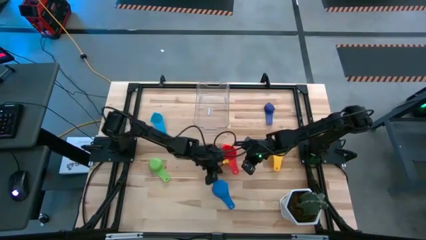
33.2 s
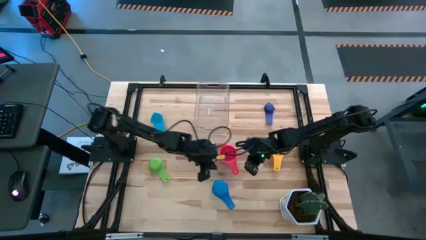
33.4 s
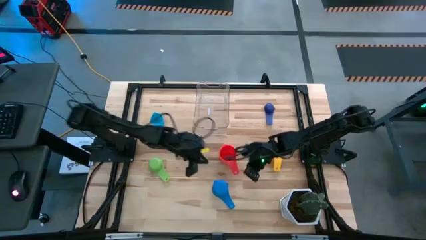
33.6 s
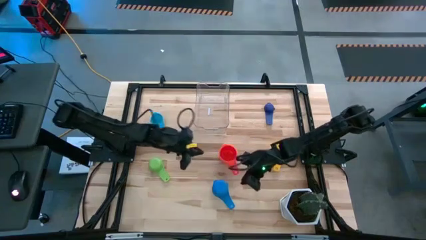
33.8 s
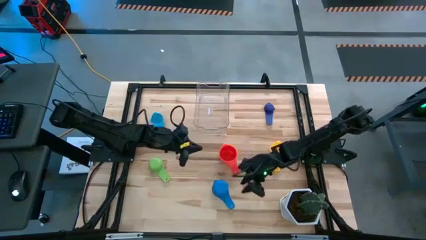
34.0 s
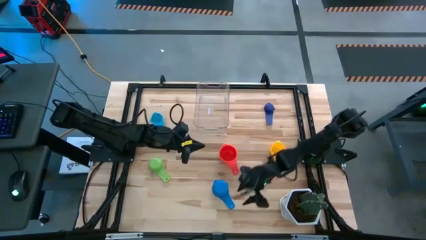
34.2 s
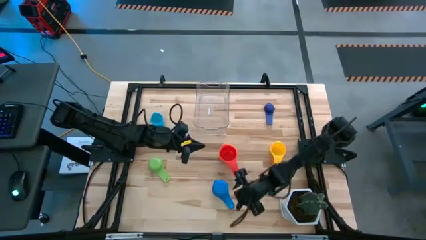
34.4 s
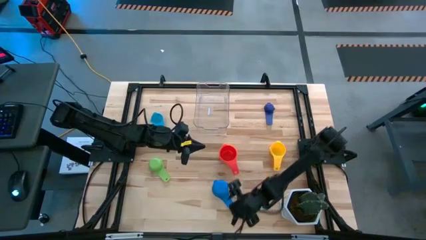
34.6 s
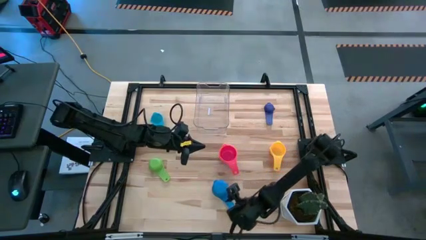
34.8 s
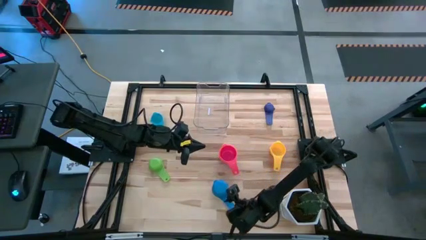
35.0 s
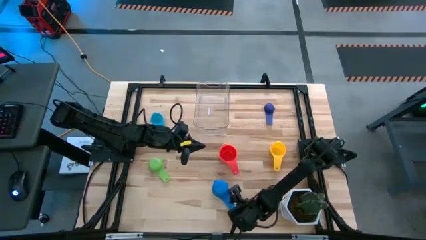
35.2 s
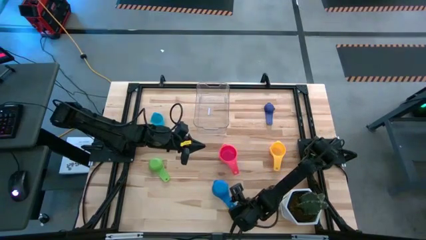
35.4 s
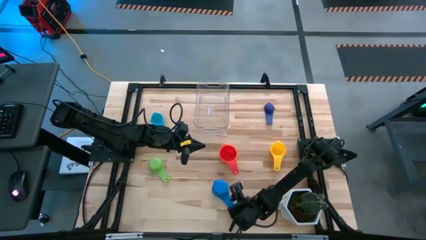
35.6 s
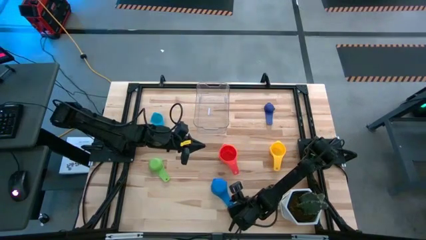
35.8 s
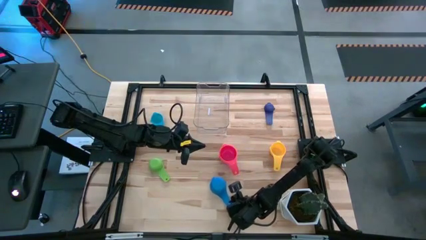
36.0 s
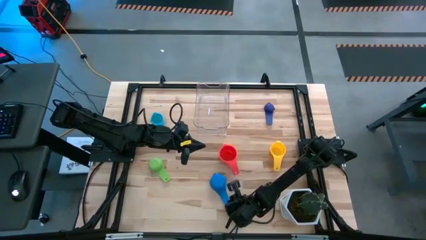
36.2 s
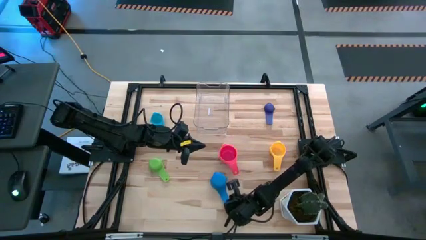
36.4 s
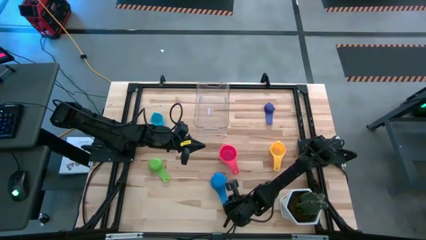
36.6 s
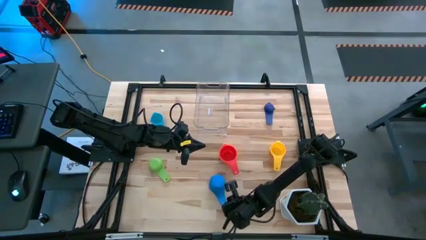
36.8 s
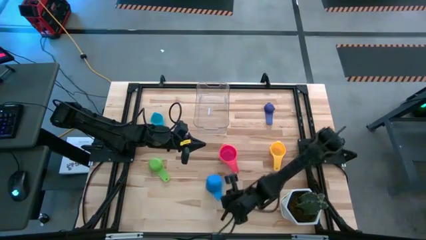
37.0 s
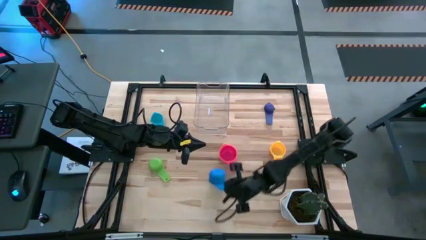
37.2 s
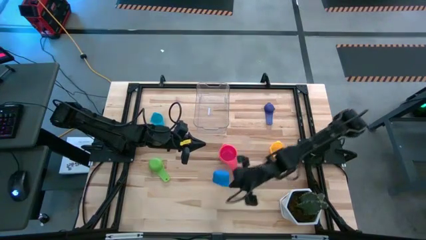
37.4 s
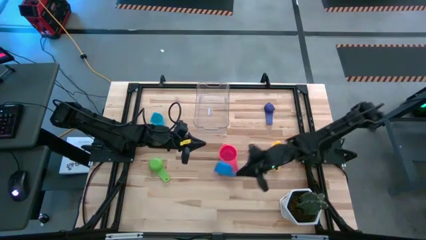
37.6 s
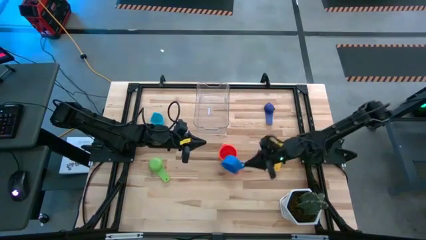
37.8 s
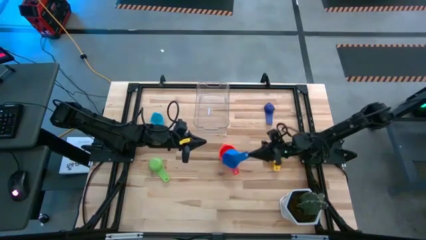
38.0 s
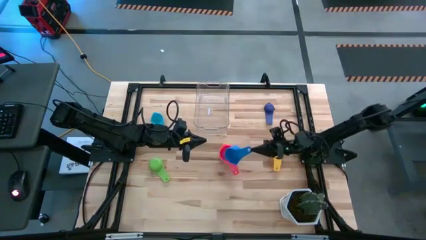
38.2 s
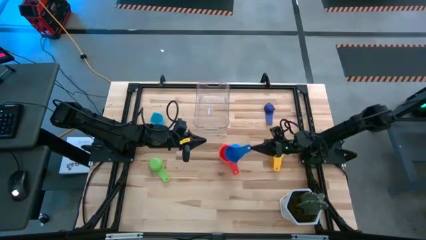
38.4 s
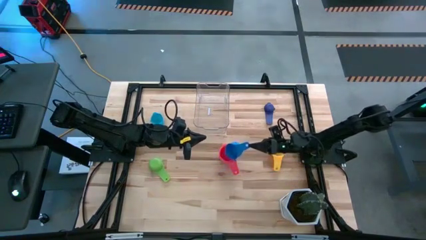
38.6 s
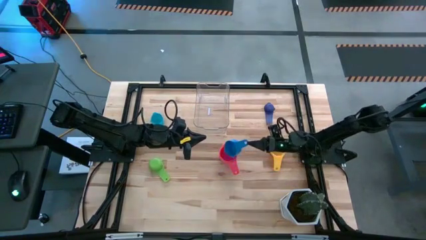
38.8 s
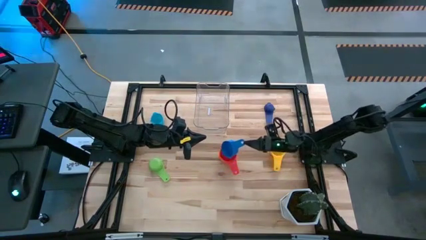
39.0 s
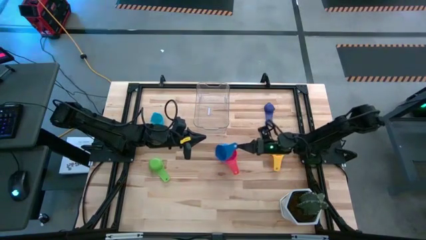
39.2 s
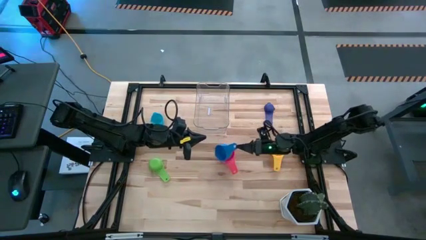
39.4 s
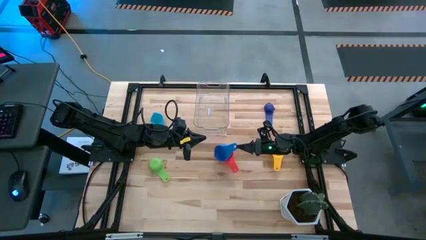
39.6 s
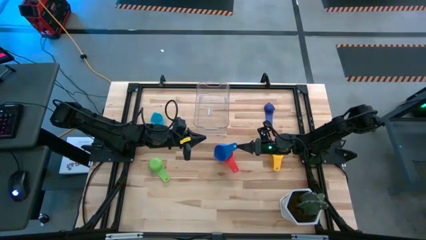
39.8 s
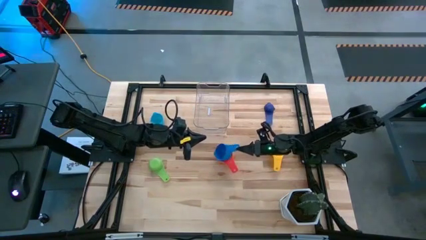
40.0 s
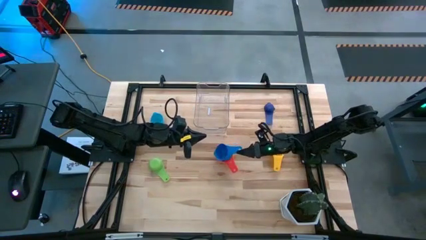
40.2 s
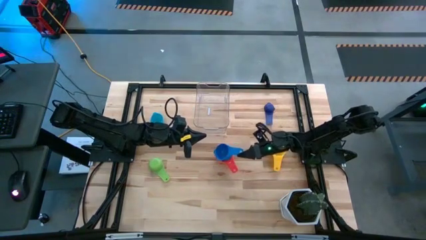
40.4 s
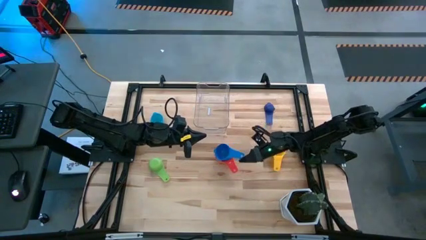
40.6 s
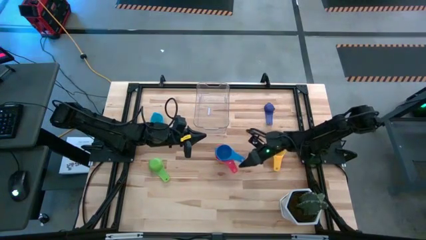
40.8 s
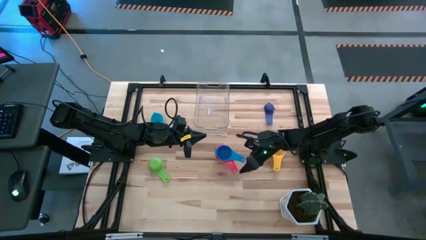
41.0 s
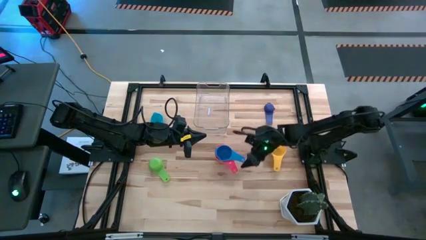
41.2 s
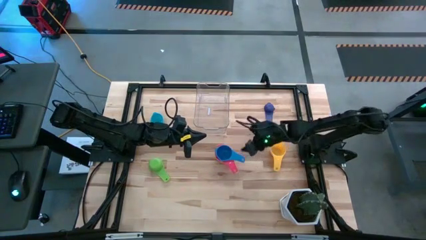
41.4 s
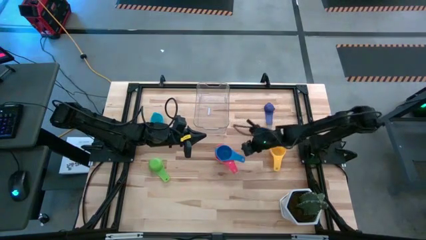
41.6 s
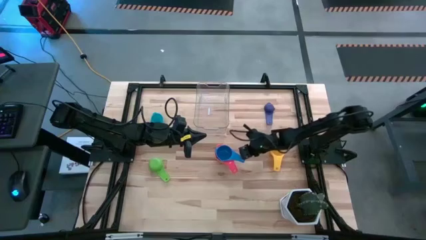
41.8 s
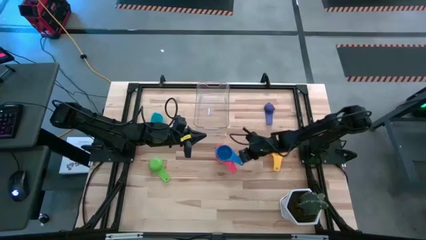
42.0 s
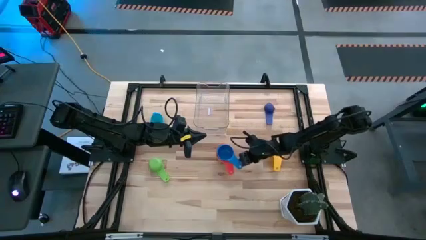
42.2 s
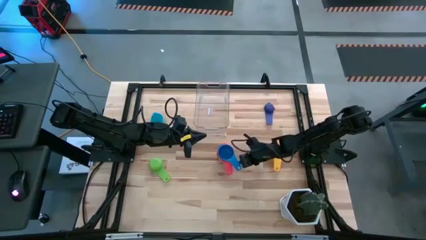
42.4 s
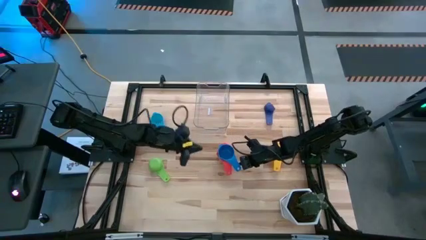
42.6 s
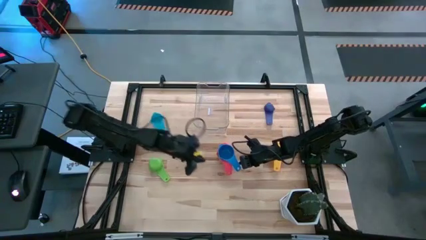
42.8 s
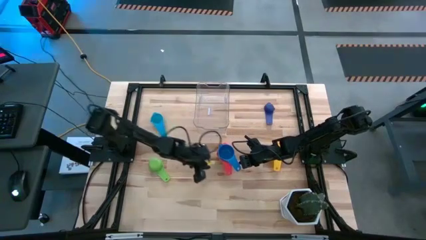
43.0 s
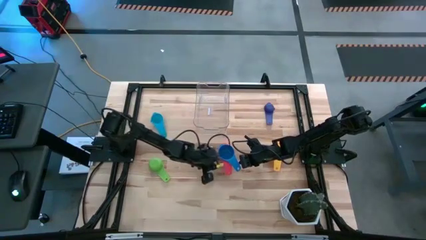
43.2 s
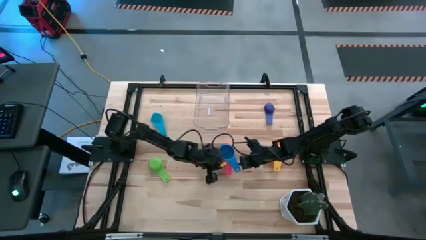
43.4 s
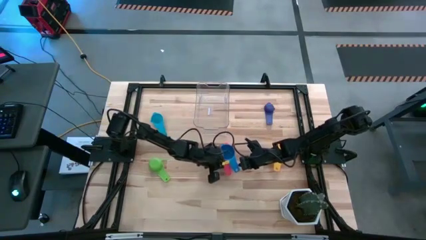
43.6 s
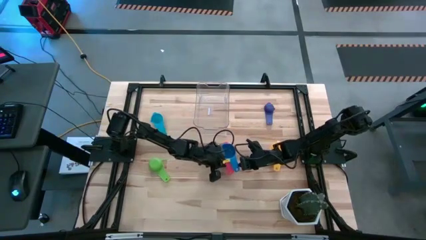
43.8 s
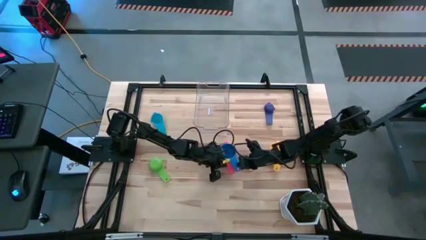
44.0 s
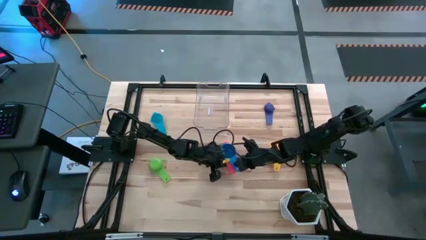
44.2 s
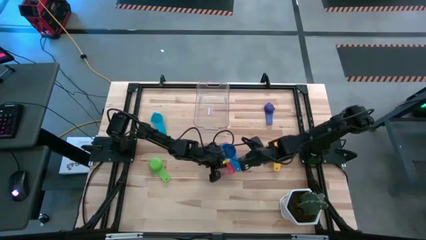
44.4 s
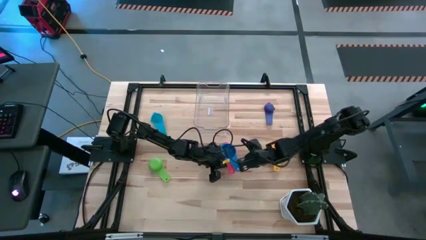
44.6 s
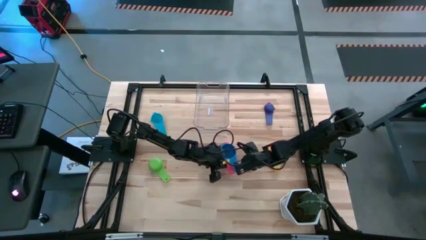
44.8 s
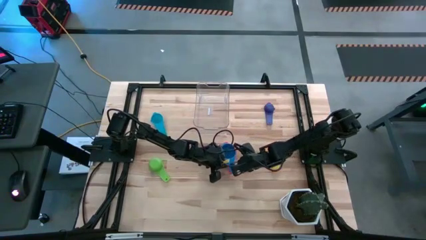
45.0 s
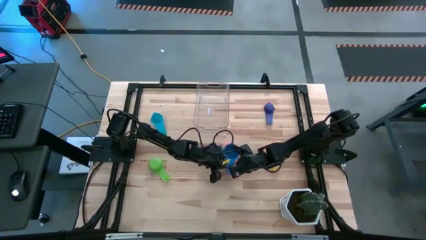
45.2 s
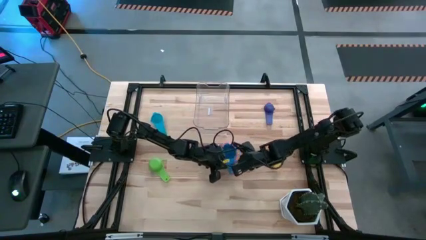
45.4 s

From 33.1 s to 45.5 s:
Task: Nest measuring cups in basket
Stack the blue measuring cup on top of the red measuring cup

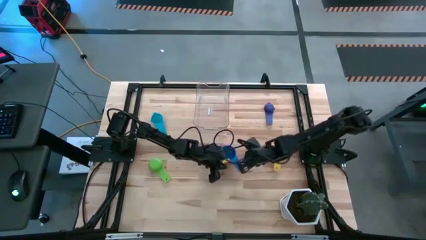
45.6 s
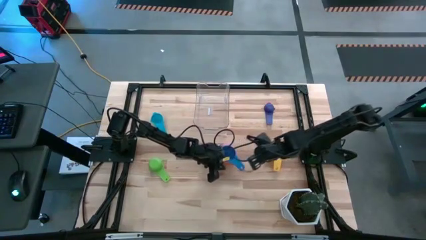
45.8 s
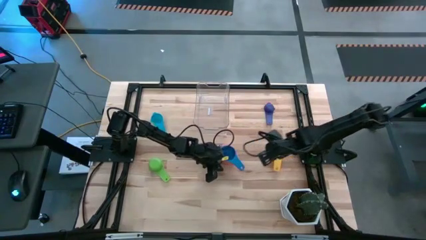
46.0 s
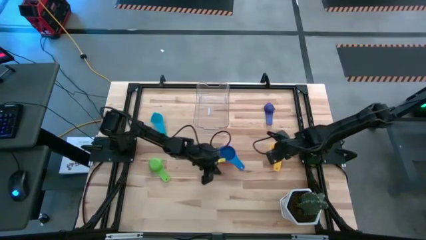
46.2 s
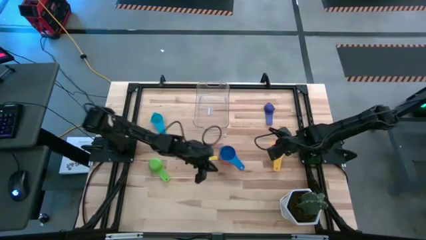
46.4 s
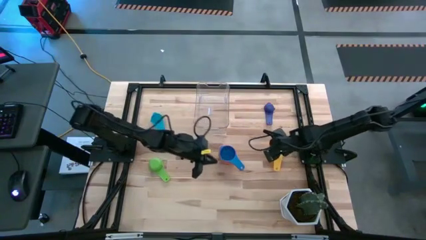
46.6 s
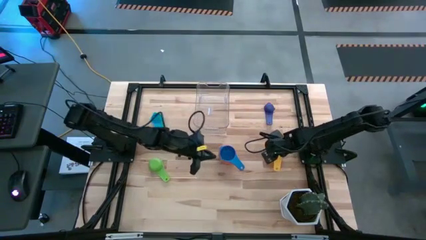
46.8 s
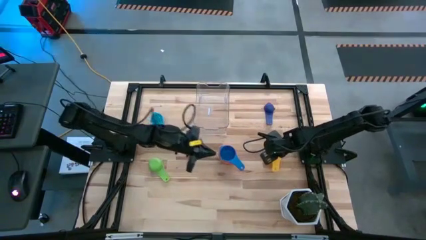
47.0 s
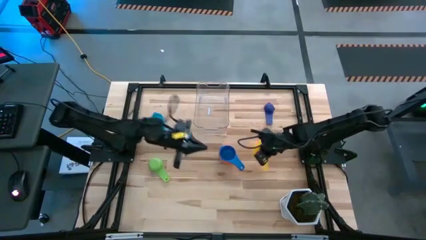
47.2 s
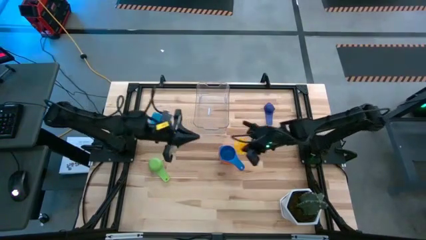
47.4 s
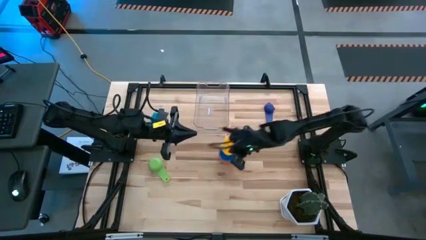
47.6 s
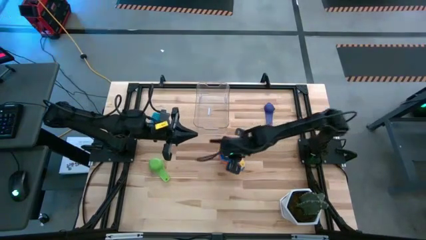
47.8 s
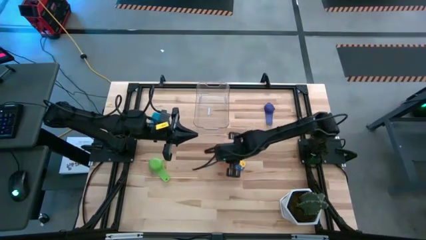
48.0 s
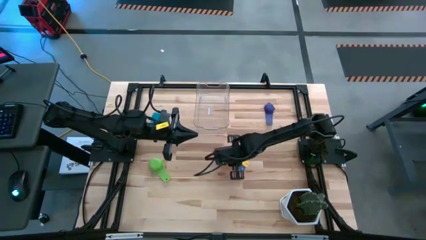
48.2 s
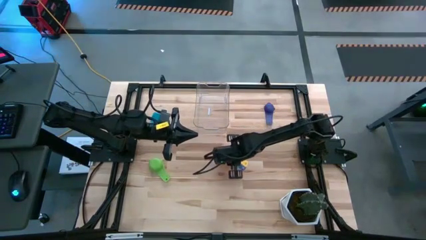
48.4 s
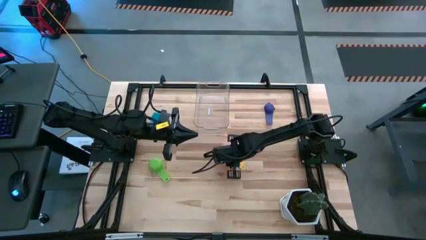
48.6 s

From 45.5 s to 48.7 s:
Stack the yellow measuring cup on top of the blue measuring cup

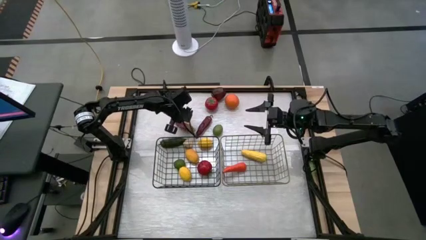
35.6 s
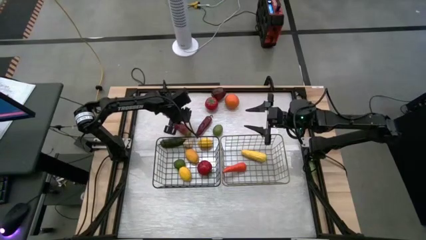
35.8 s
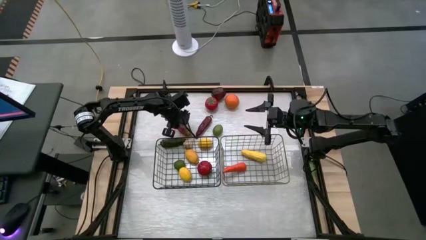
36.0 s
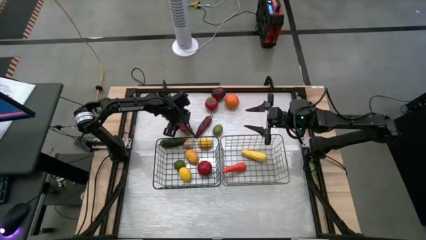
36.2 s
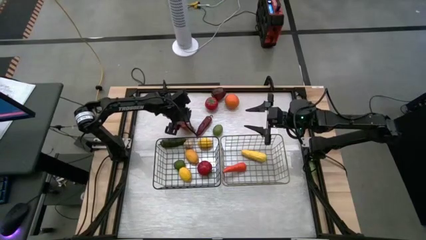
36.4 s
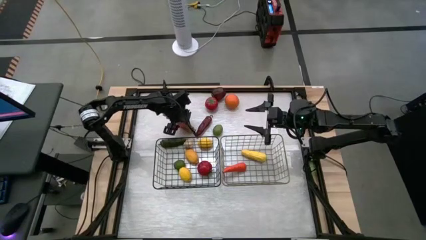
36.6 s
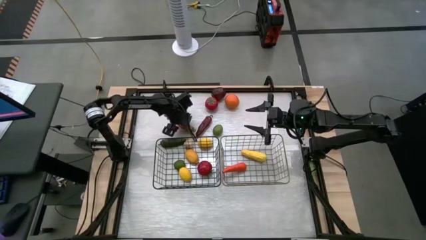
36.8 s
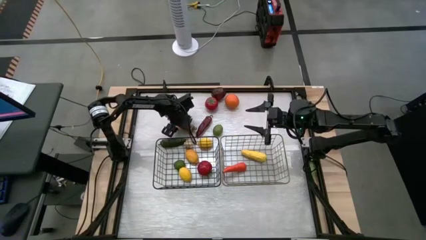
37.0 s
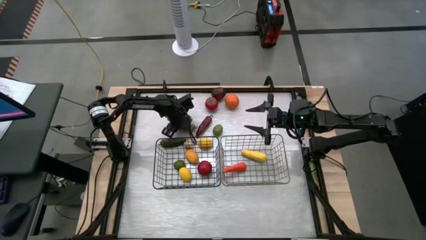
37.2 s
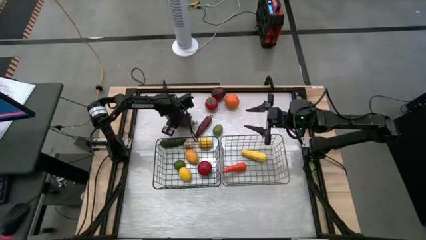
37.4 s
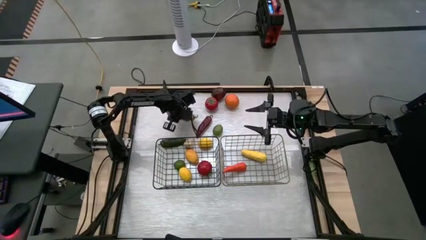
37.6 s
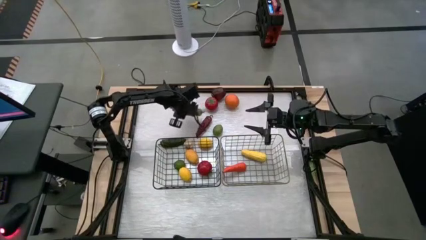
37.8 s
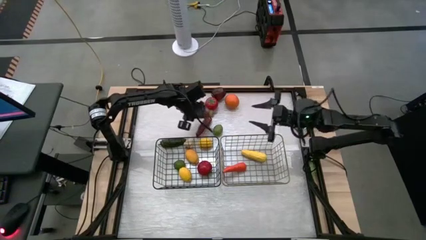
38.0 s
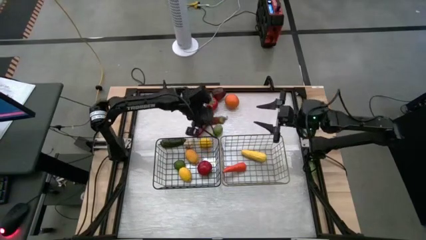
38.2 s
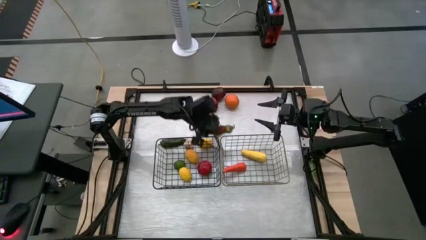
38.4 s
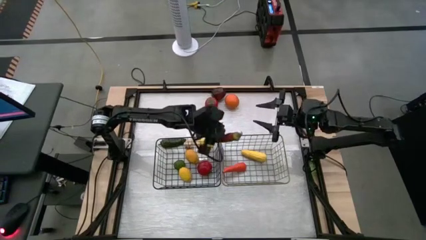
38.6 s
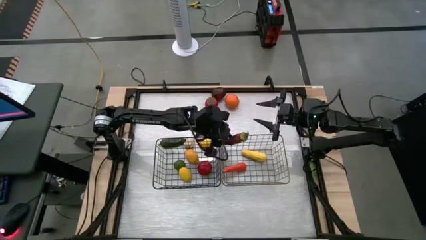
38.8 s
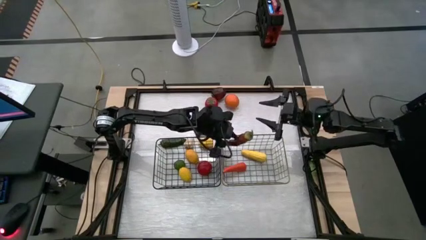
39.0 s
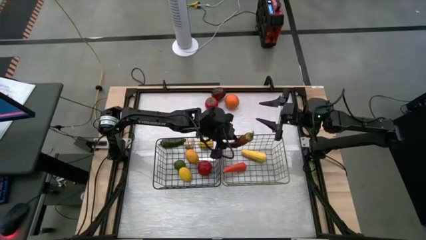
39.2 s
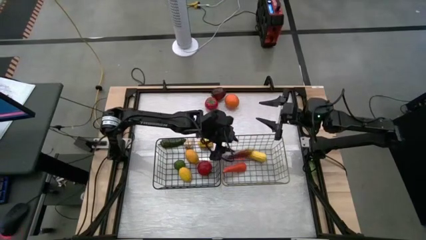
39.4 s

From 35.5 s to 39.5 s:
Task: Sort produce into baskets
Put the left red bell pepper into the gold wire basket
